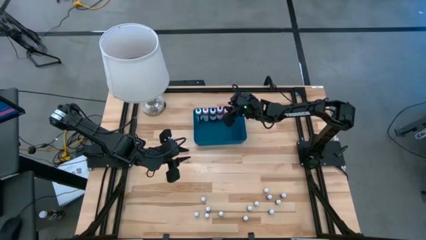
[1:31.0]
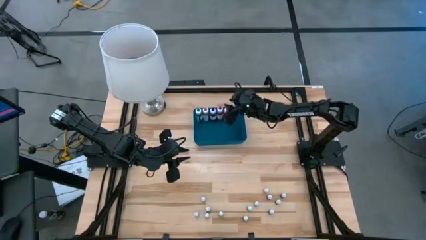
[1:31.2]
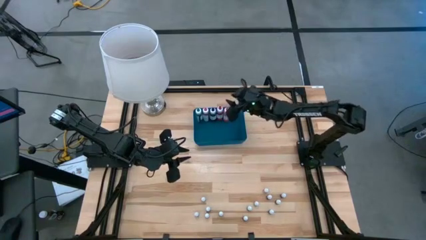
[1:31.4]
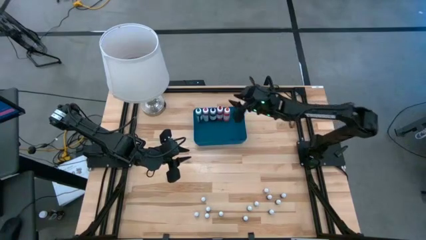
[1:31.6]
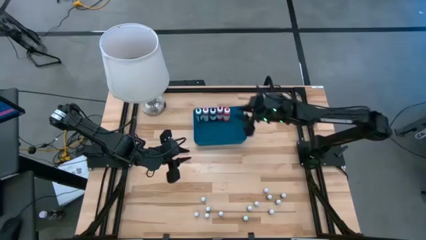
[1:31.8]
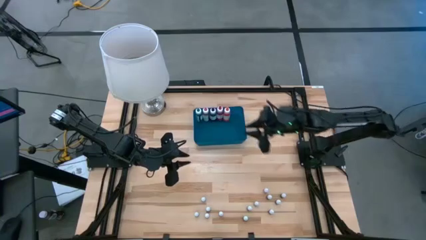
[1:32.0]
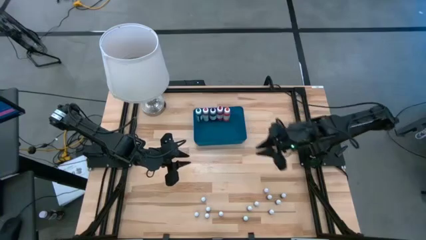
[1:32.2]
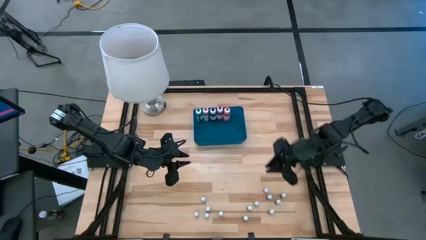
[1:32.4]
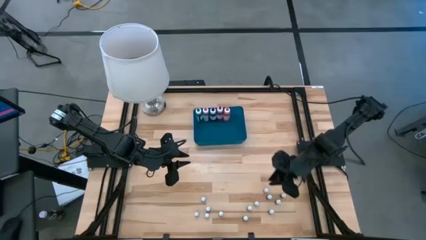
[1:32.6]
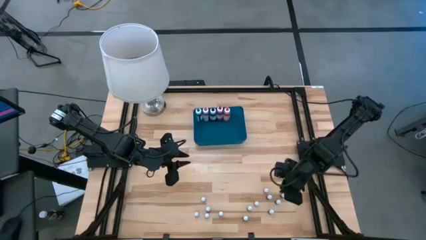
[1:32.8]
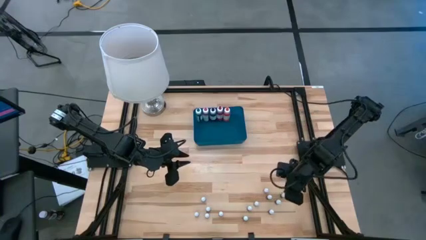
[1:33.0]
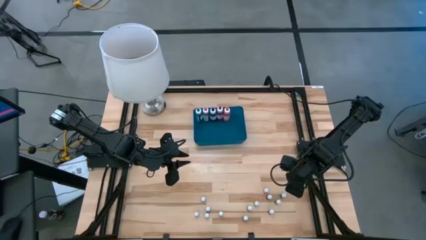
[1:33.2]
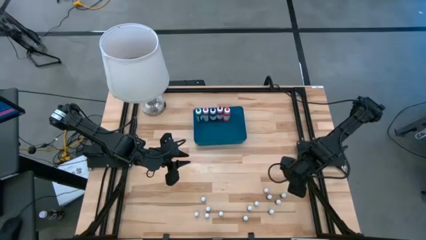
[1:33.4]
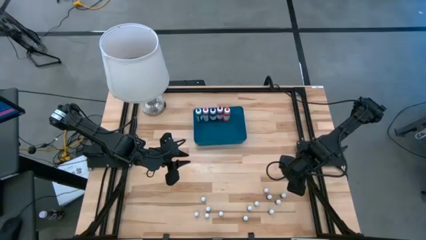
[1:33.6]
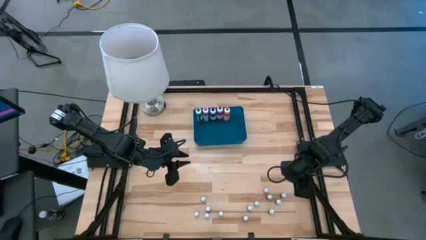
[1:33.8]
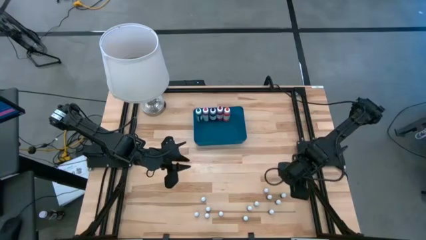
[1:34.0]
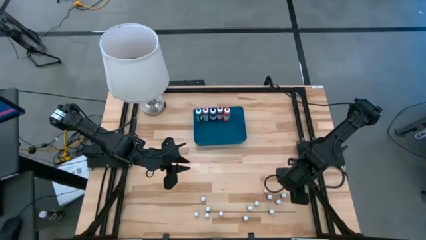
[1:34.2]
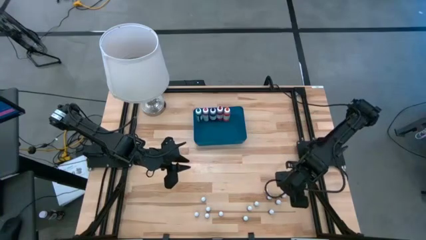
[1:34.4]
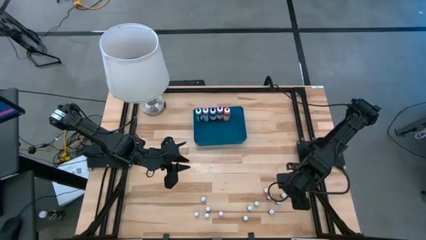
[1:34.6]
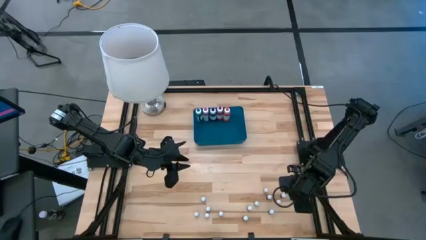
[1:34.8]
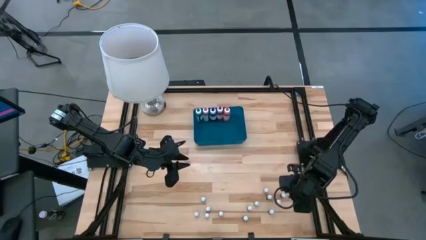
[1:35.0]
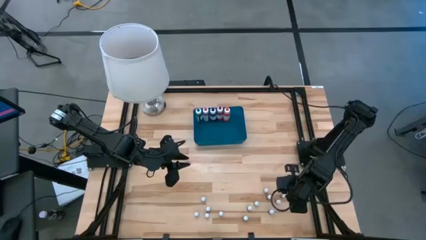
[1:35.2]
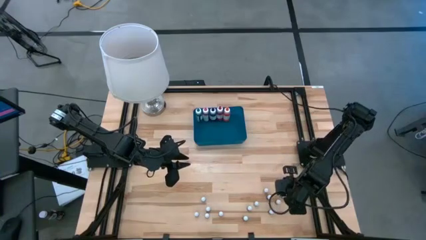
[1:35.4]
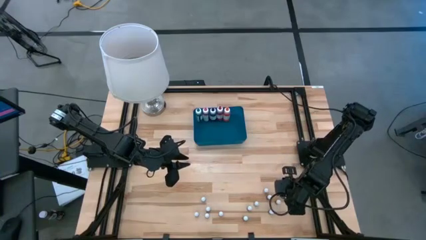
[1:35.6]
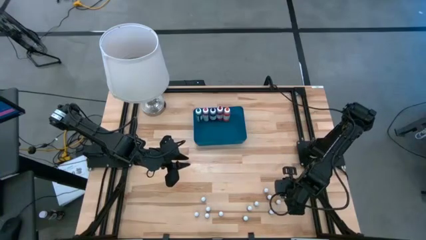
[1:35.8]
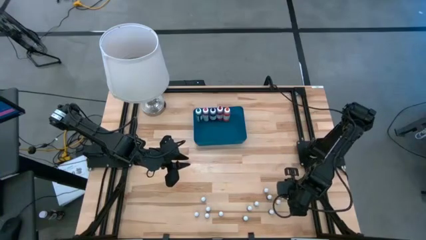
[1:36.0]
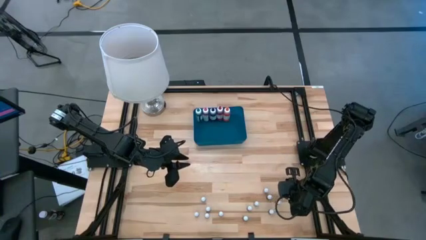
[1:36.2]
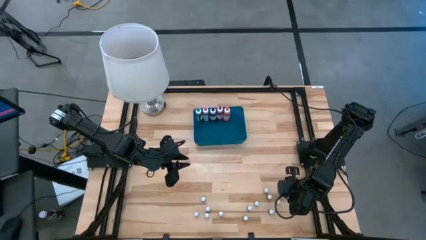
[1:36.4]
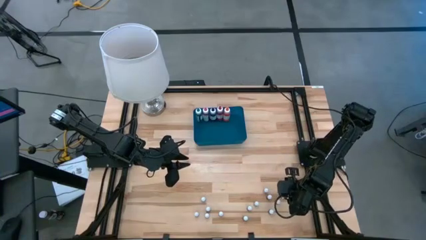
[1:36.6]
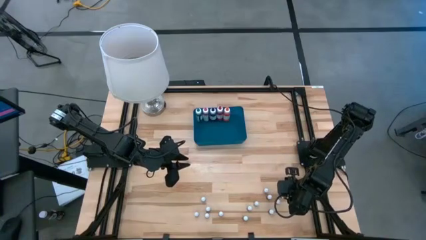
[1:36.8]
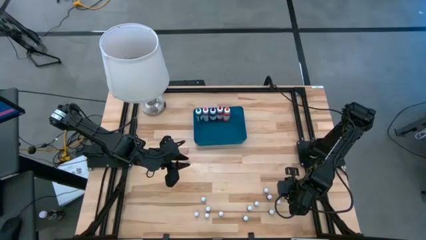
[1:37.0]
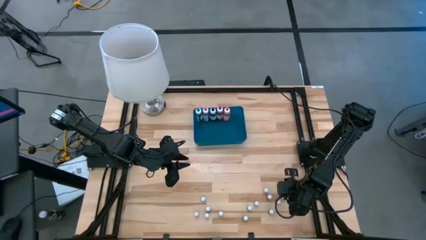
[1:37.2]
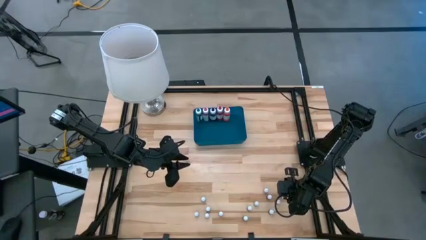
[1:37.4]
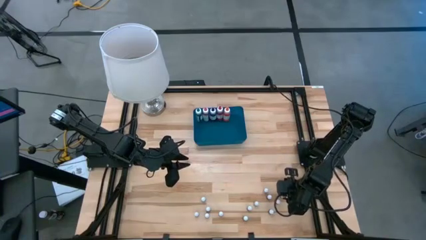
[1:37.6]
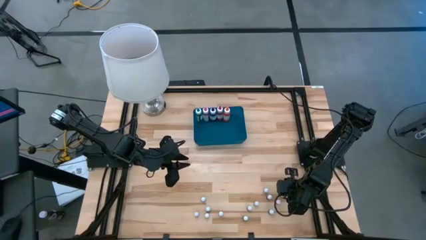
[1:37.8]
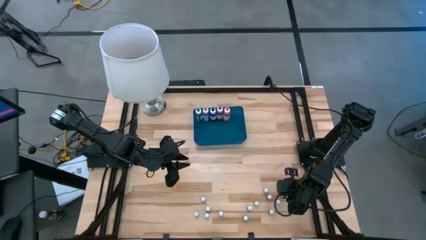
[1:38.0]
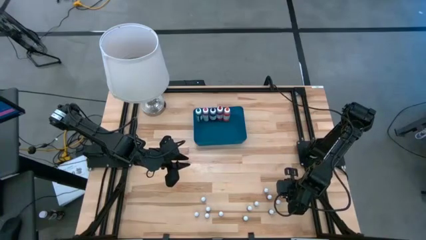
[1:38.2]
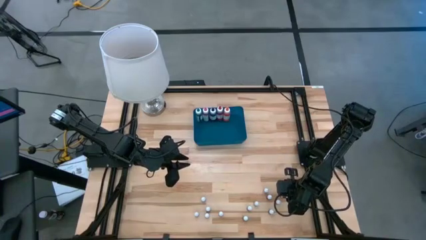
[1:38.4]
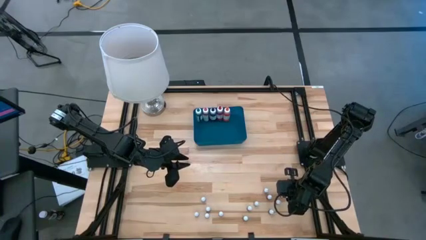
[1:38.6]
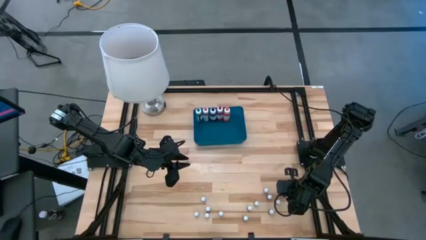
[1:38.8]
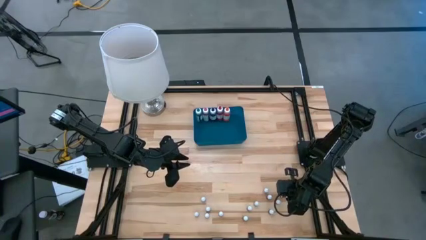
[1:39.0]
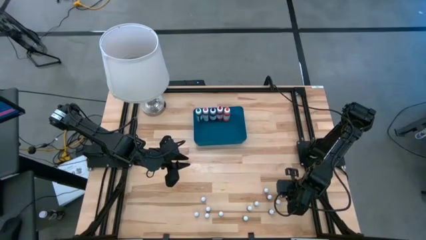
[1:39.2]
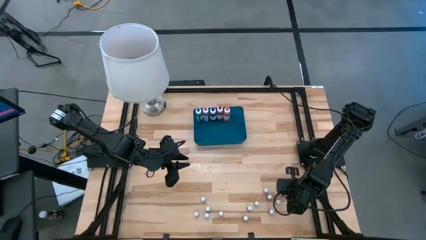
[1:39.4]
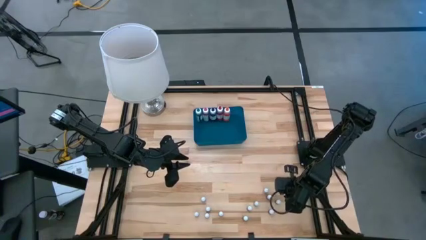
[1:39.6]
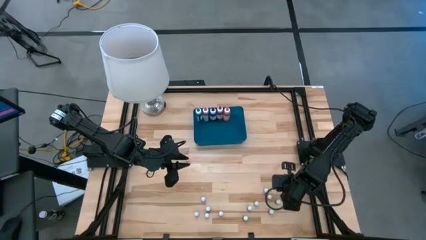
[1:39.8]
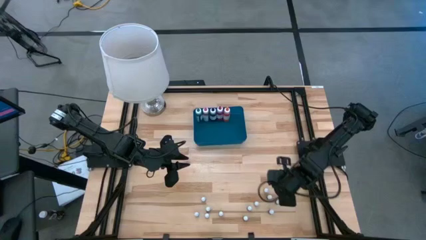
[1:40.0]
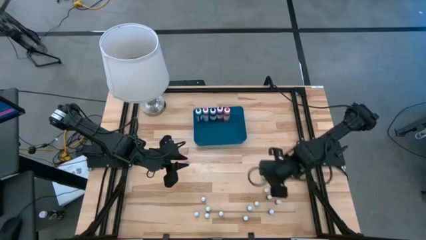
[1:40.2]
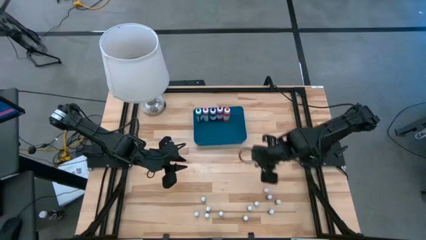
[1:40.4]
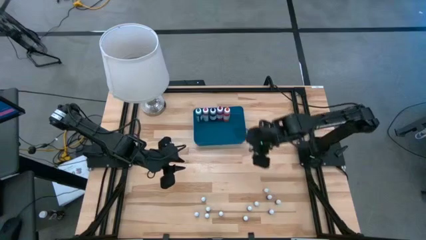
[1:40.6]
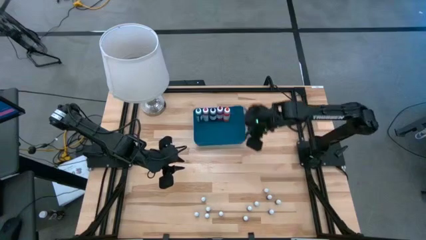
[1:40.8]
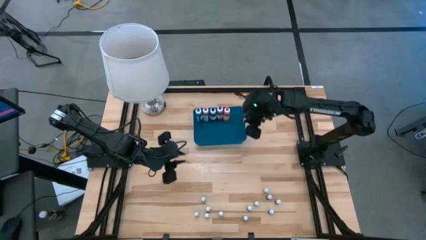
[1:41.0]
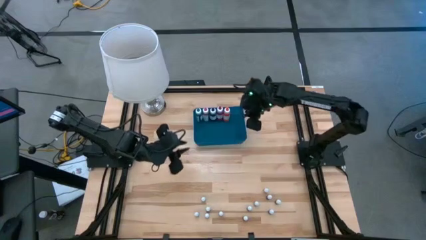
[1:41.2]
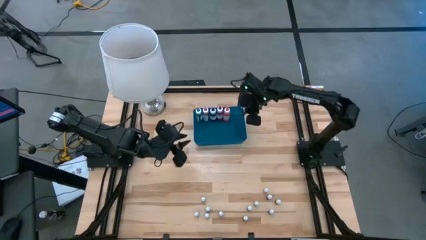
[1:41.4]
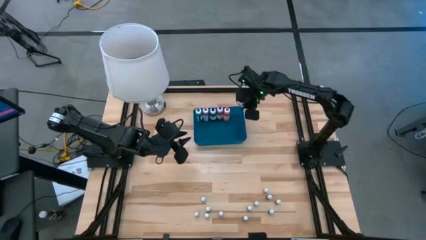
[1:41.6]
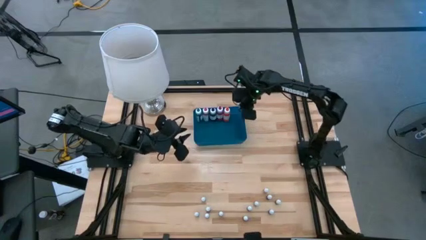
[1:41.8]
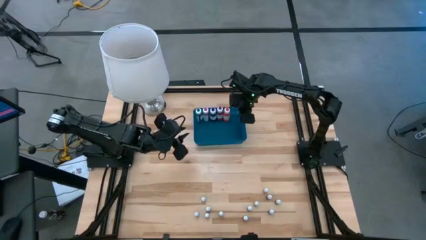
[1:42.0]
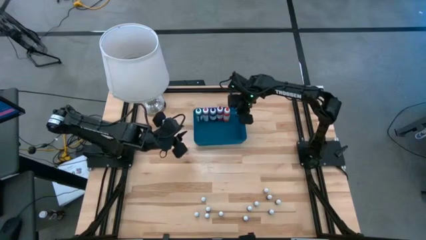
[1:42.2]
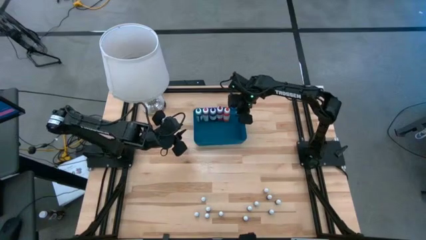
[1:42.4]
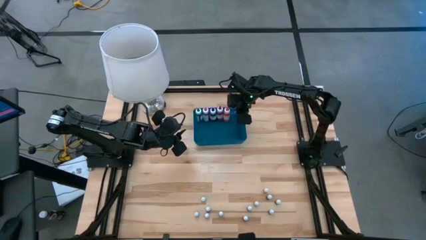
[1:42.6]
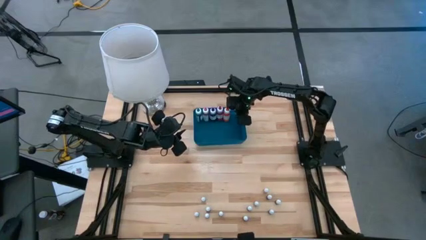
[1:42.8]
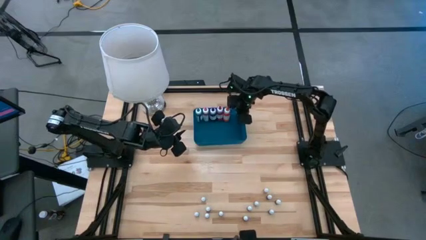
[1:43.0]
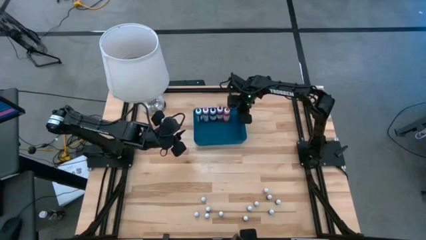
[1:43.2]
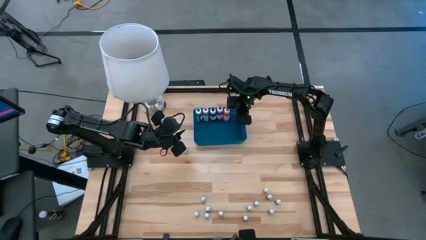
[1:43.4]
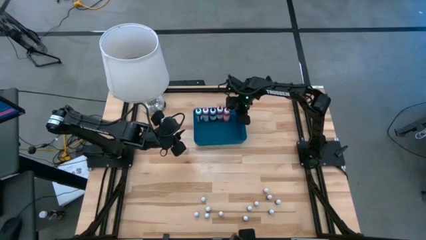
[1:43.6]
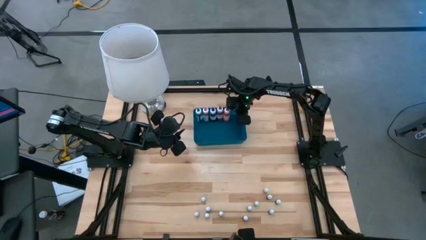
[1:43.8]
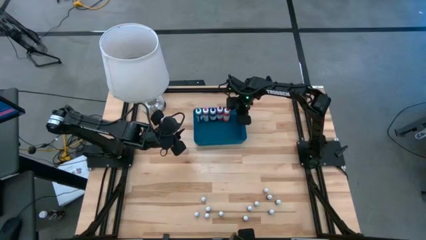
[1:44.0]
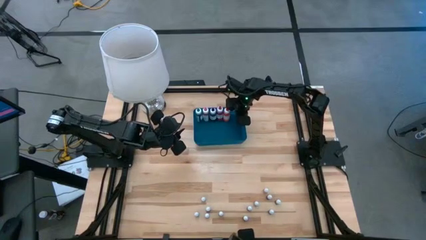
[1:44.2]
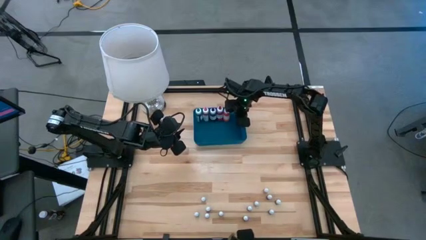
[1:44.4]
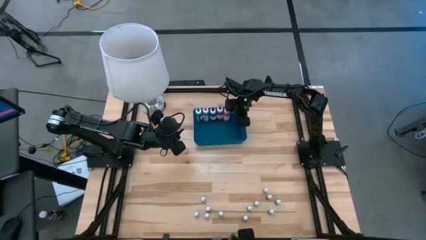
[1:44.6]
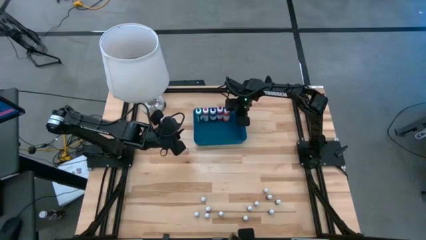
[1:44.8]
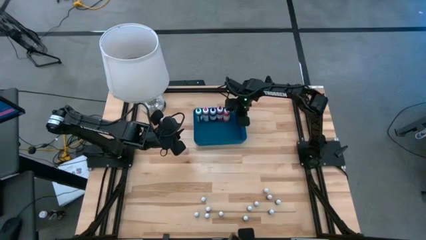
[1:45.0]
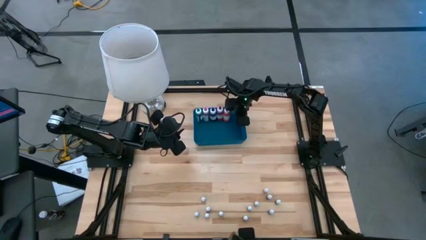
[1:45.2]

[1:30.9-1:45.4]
Task: Pick & Place food coloring
Put the small black food coloring bottle into the bin
